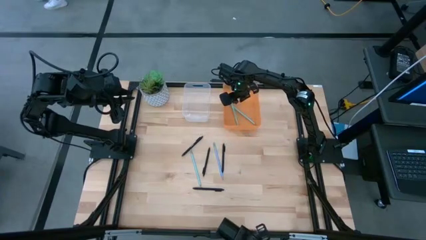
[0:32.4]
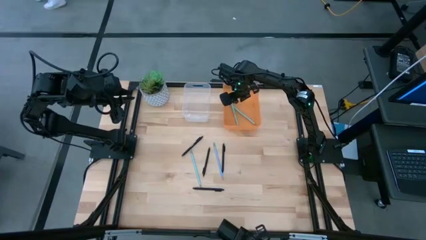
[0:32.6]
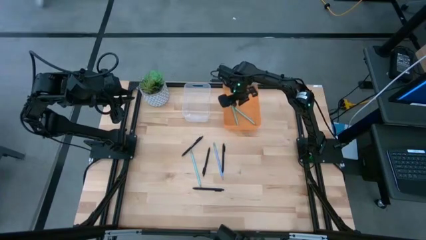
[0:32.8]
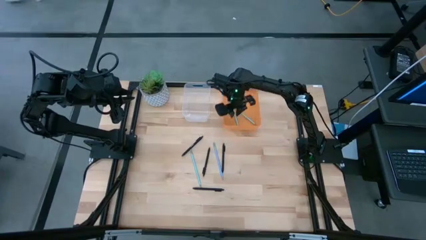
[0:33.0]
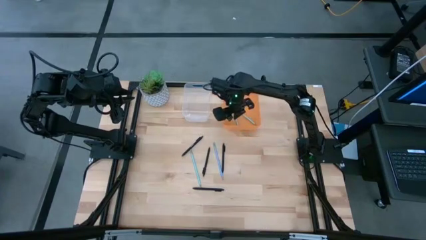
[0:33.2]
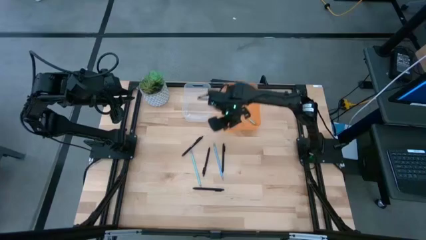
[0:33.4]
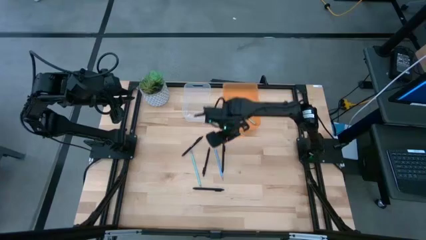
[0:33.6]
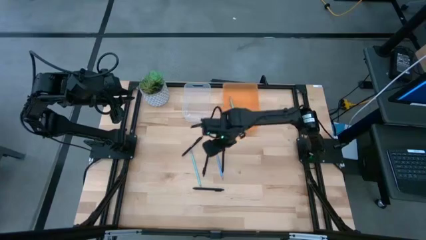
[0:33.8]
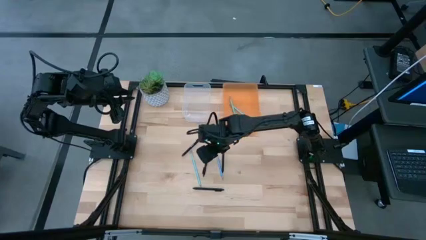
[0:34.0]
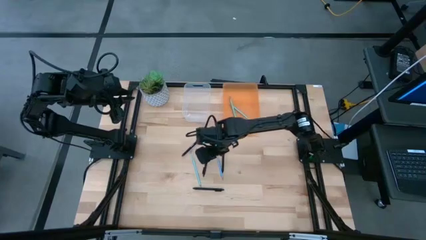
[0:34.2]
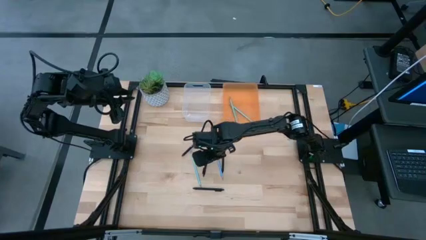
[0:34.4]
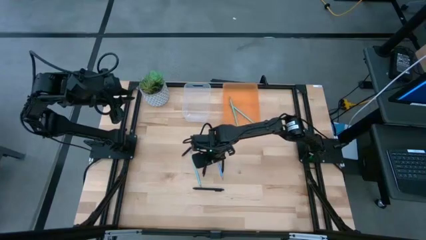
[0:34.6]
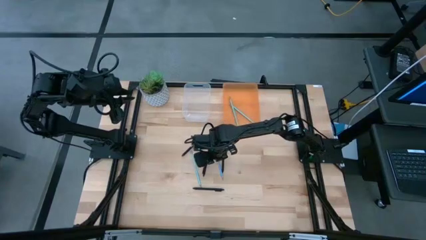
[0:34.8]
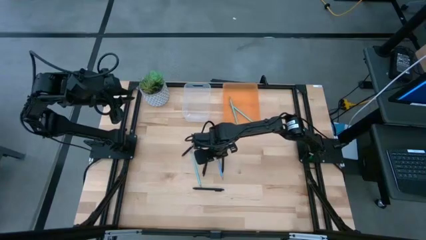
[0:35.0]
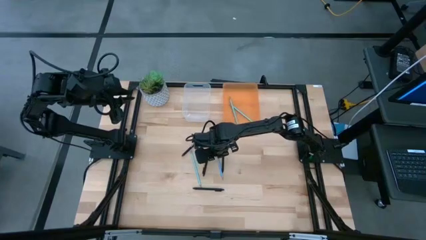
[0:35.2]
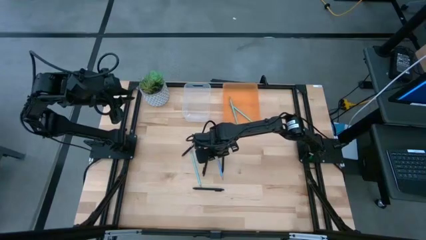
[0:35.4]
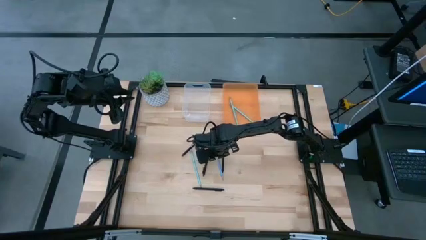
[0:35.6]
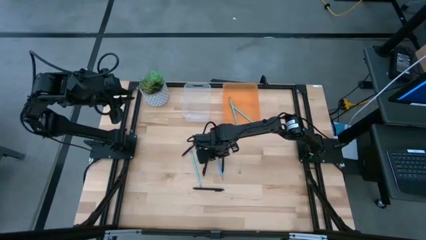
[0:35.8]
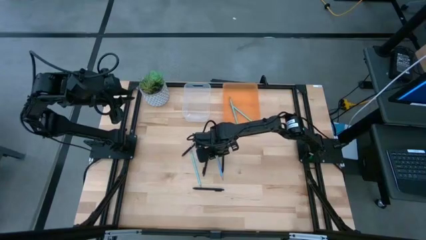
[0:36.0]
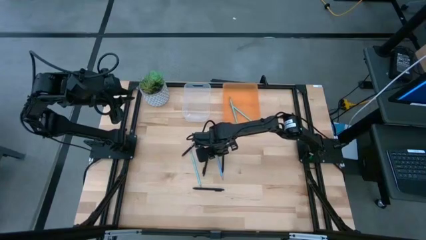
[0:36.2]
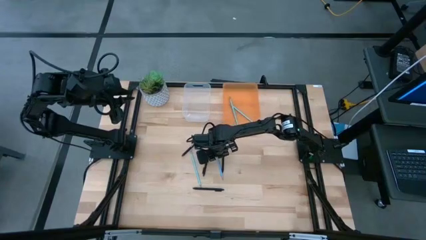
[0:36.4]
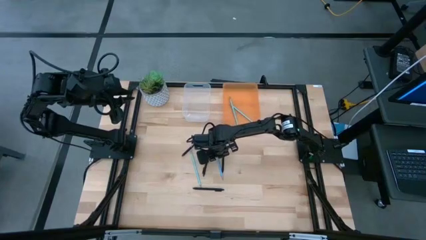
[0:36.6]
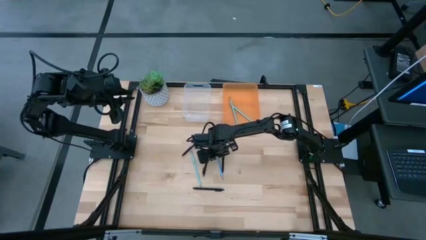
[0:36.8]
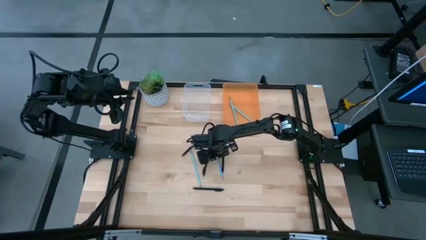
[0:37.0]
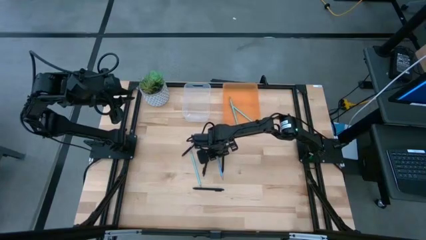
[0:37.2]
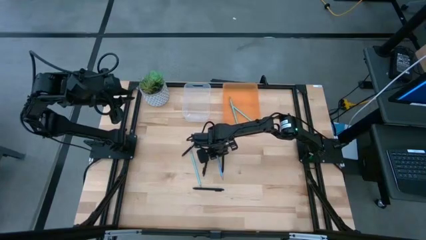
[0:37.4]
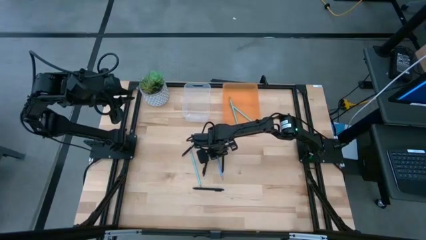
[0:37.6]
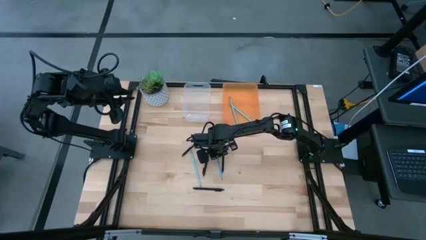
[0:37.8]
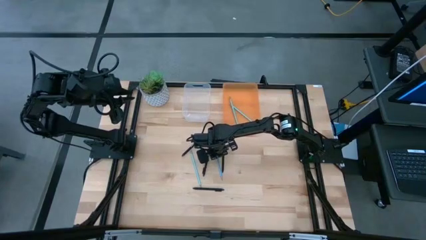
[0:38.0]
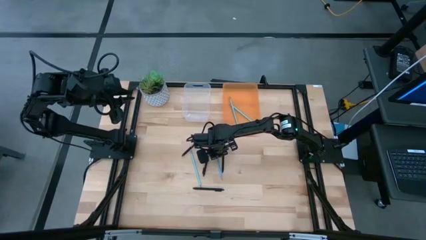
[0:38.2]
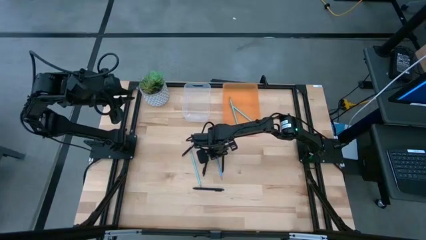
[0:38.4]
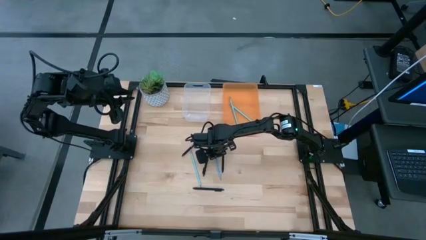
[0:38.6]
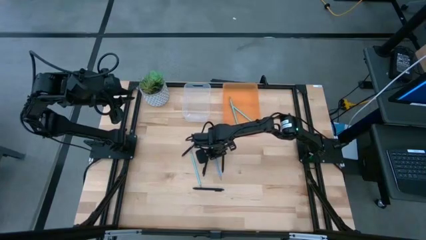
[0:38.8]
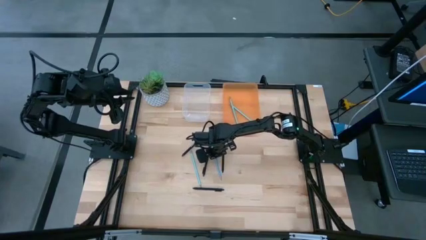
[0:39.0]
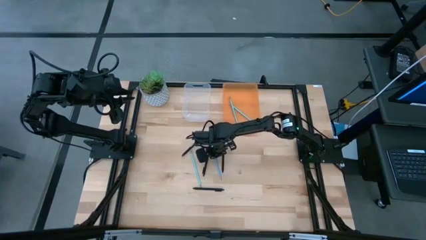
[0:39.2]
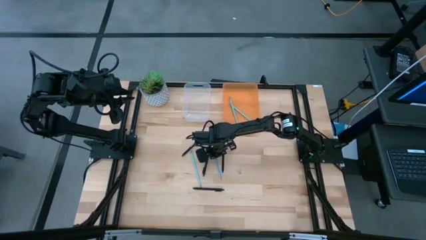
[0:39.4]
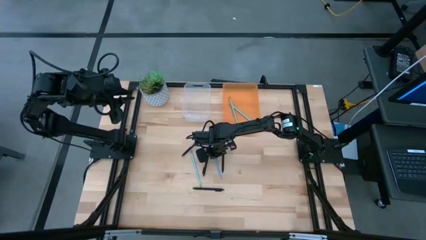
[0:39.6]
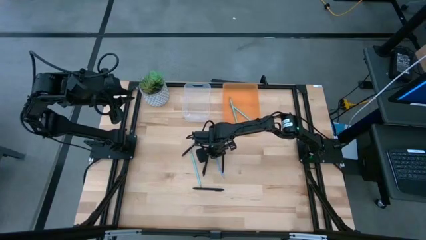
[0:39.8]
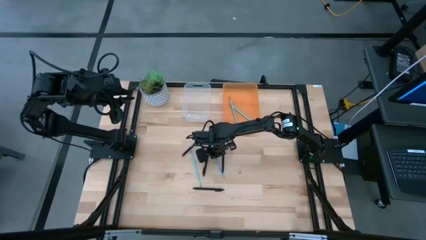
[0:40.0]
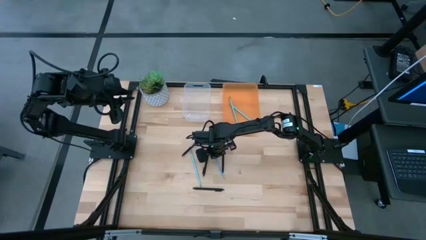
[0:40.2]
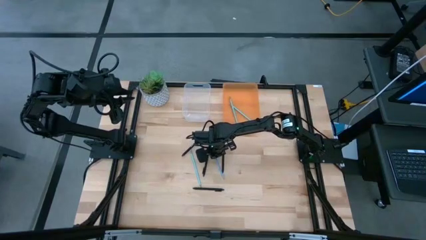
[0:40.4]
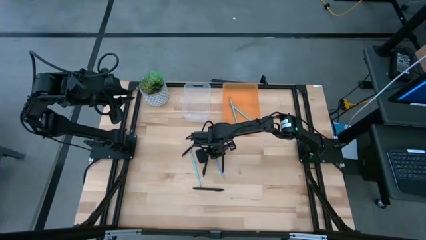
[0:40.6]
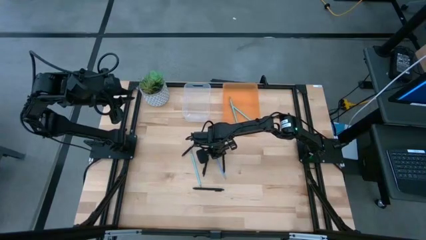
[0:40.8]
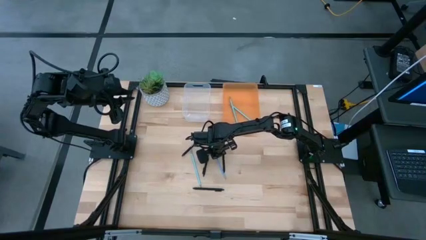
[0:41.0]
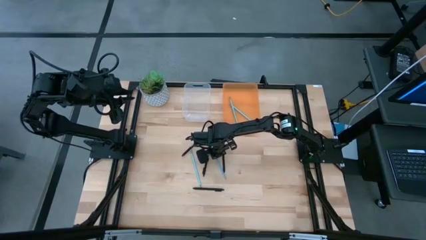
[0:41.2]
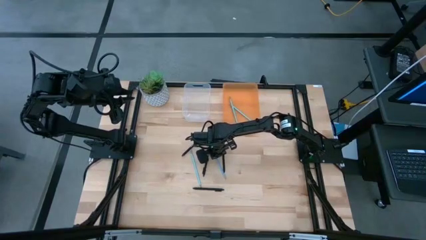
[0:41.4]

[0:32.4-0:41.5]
Task: Sort pens & pencils
Put the light blue pencil into the orange bin

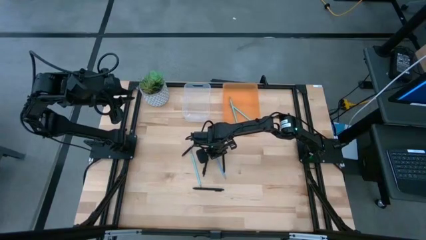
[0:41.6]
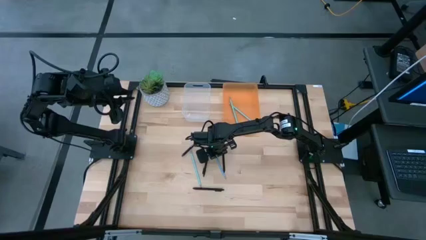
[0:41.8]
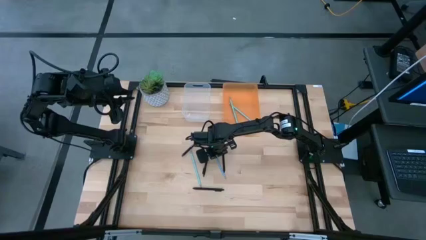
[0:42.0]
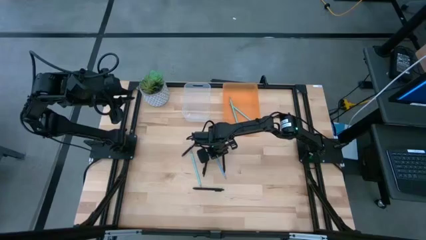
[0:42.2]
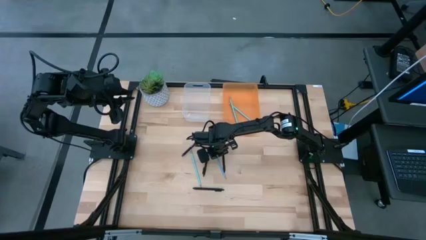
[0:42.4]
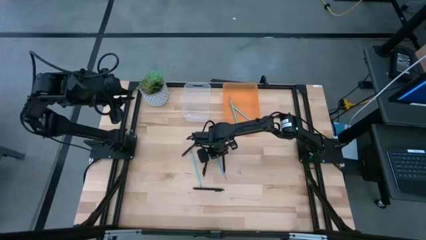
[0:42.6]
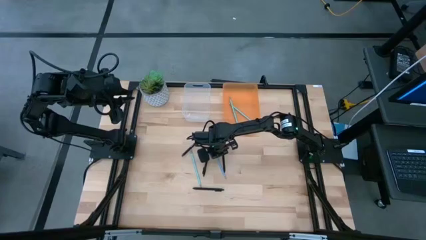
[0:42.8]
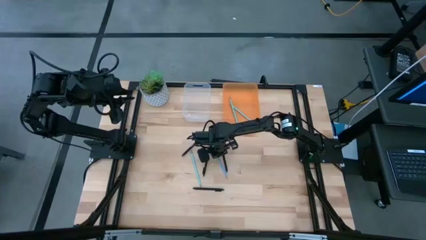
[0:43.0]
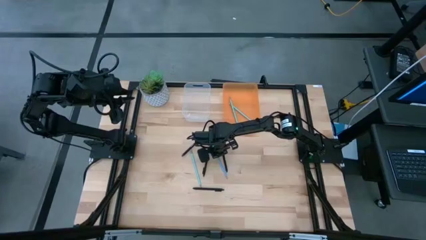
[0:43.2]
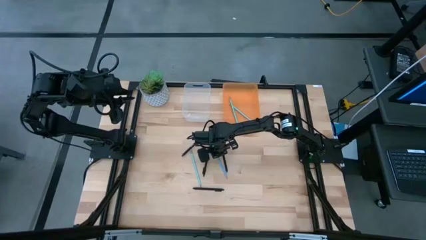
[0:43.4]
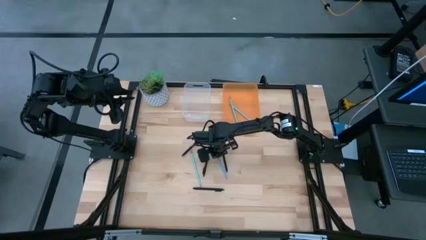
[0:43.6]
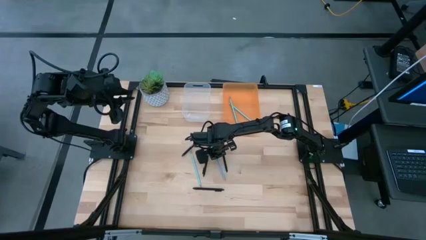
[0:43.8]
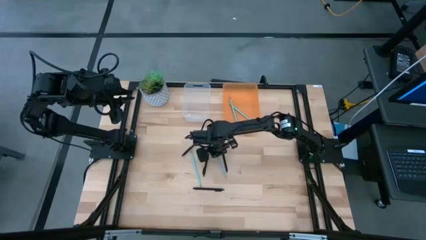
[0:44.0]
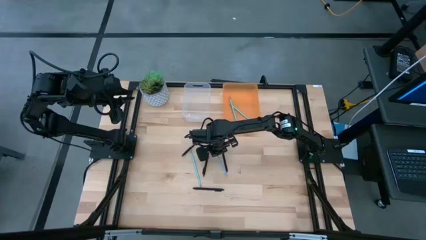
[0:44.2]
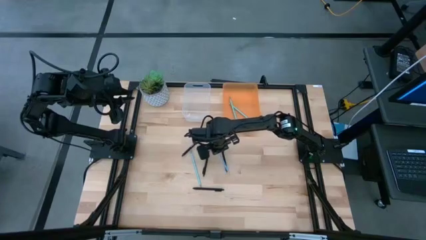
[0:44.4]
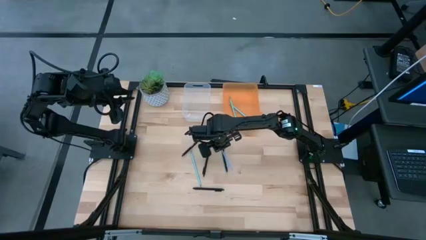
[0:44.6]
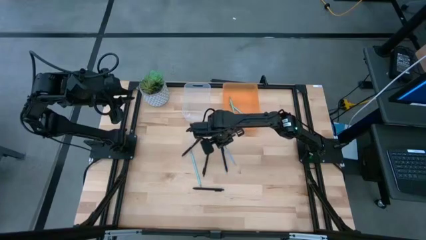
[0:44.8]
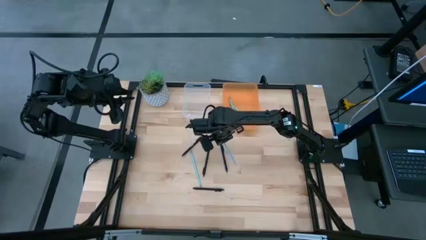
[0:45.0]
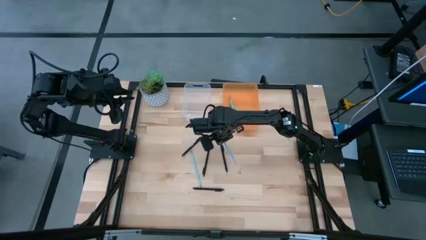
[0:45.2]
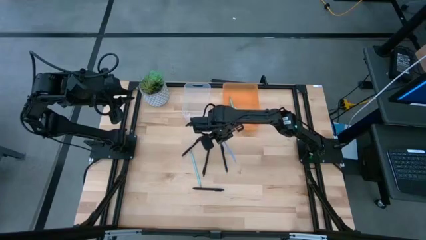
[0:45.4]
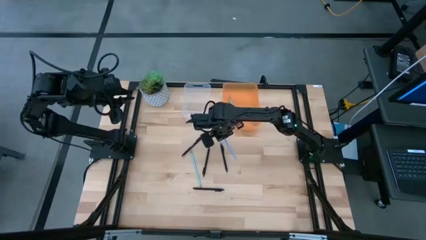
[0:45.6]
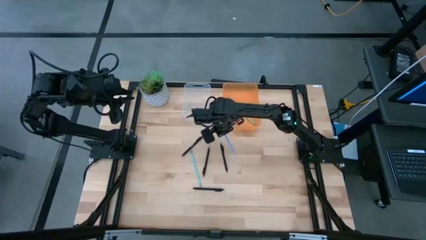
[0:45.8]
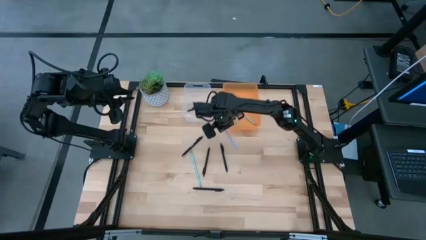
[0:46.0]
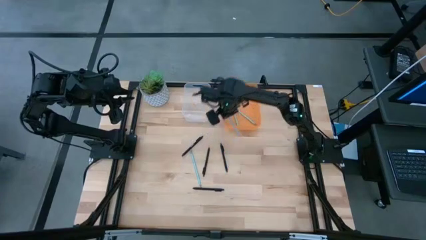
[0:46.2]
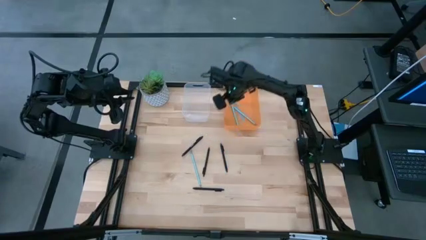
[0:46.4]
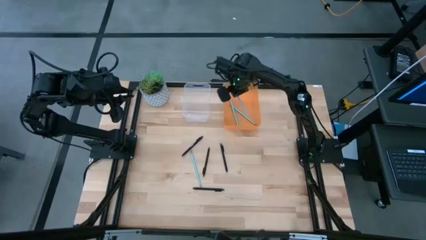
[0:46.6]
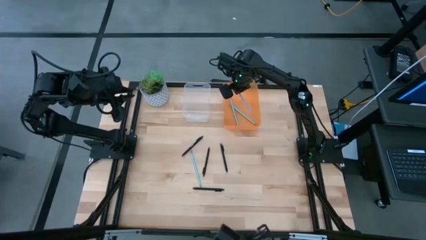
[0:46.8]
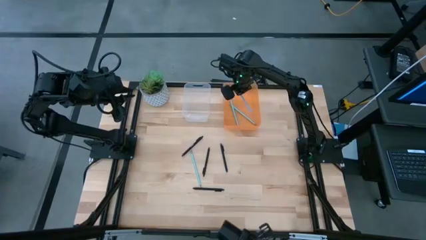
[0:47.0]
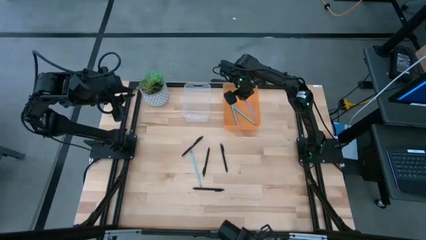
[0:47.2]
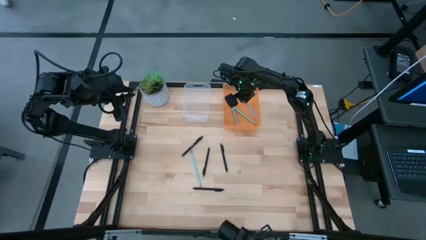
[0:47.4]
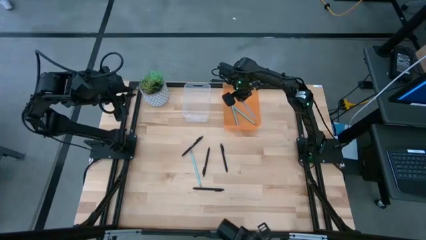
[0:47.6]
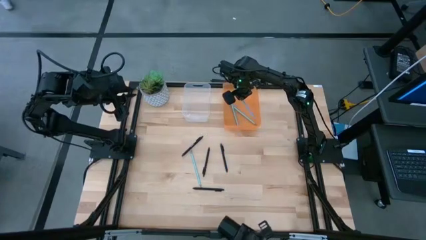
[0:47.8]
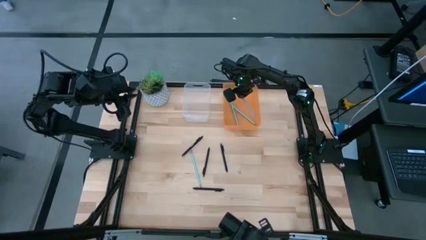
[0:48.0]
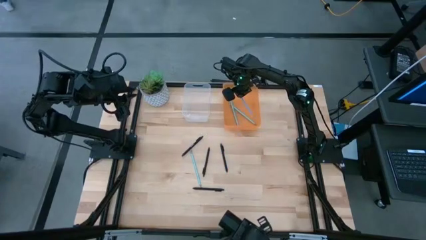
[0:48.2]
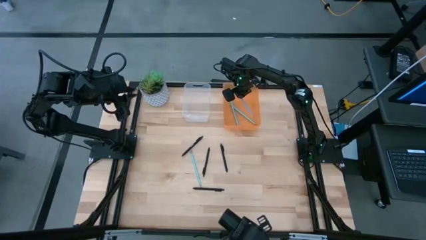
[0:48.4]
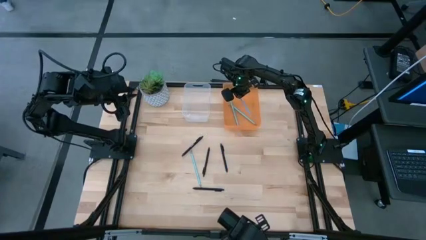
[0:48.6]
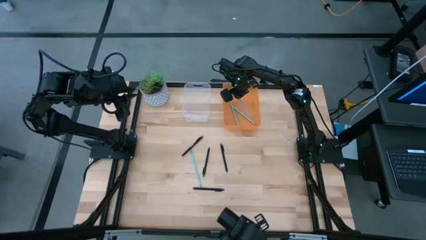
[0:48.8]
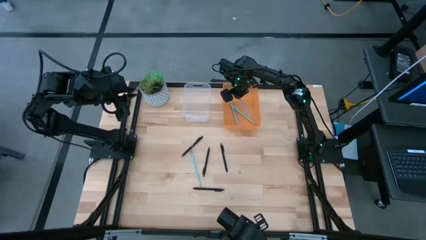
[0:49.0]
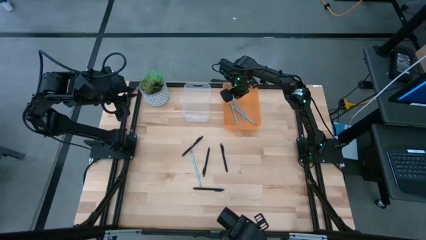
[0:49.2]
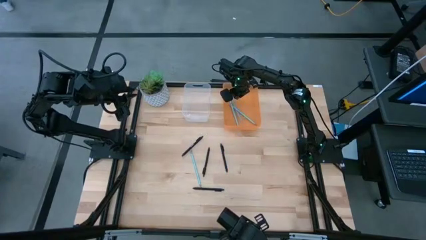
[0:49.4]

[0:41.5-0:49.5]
Put the light blue pencil into the orange bin
